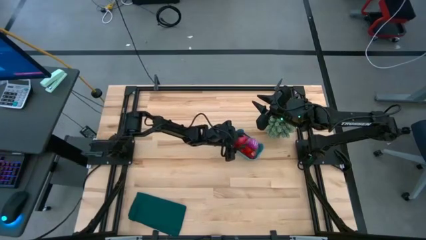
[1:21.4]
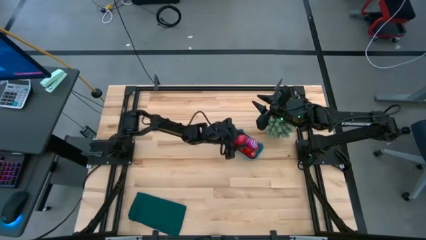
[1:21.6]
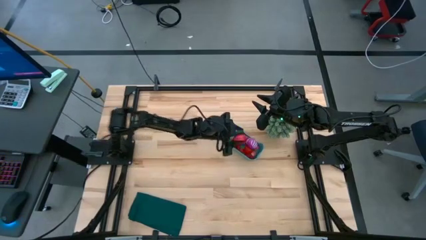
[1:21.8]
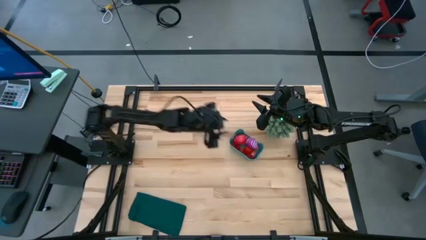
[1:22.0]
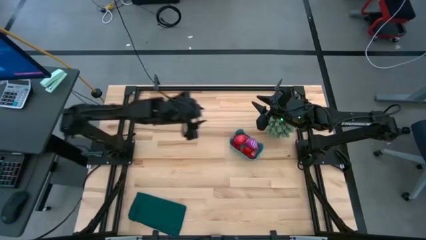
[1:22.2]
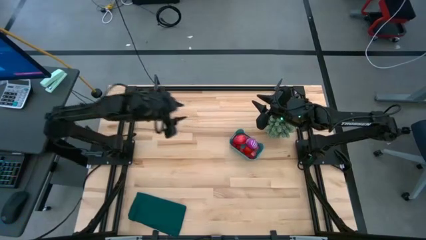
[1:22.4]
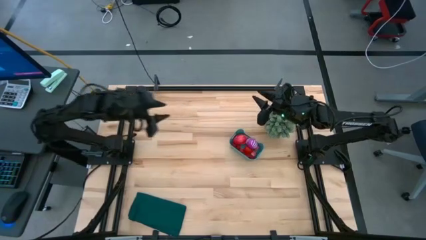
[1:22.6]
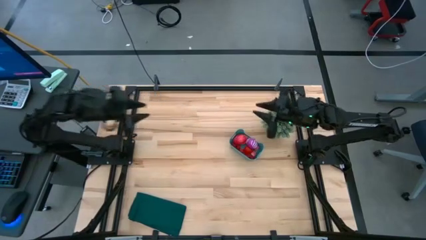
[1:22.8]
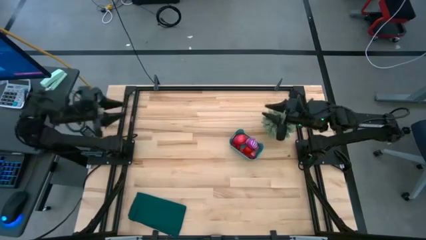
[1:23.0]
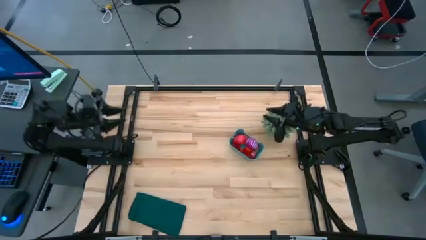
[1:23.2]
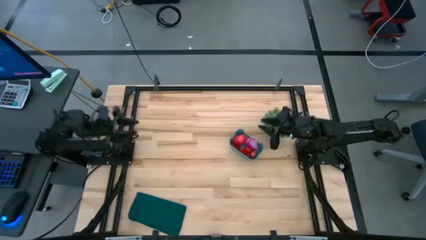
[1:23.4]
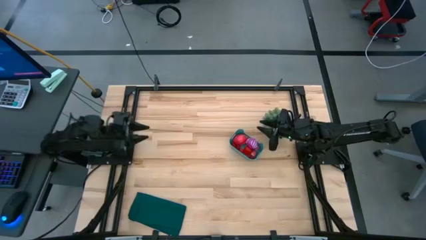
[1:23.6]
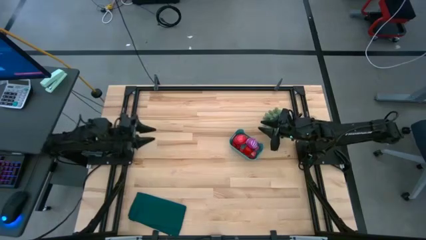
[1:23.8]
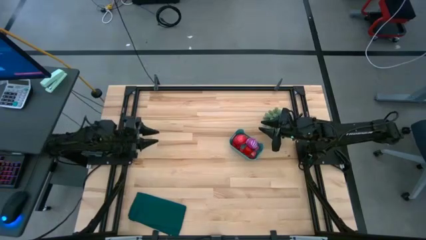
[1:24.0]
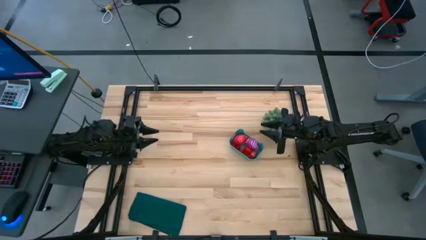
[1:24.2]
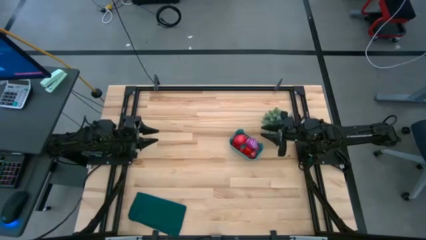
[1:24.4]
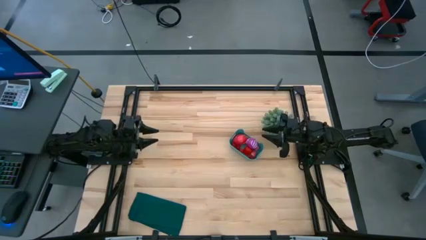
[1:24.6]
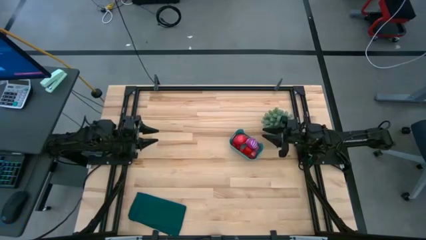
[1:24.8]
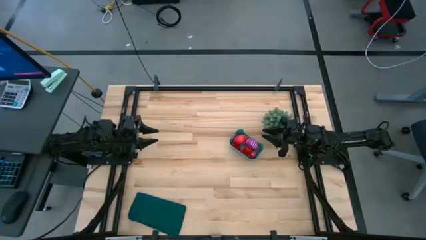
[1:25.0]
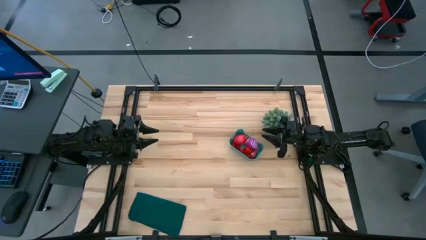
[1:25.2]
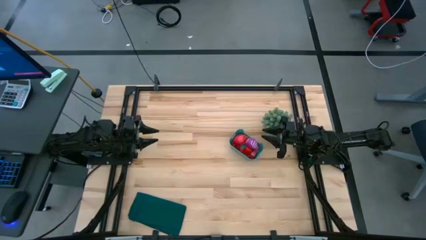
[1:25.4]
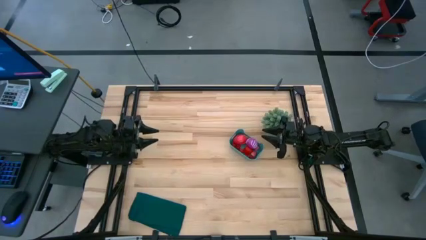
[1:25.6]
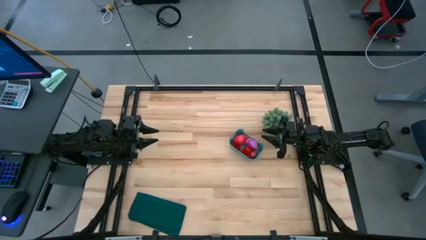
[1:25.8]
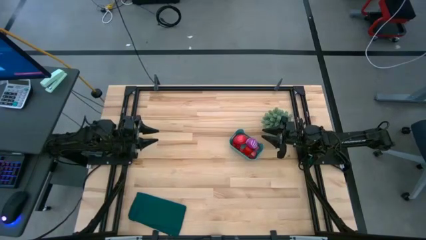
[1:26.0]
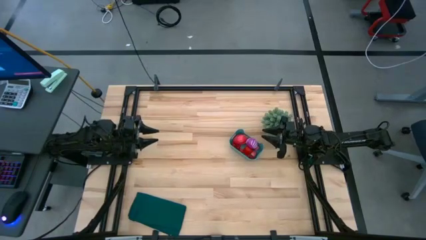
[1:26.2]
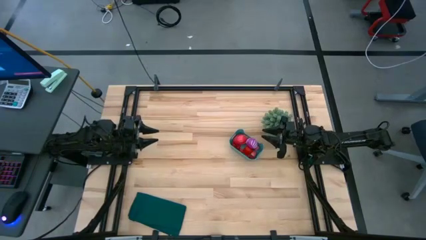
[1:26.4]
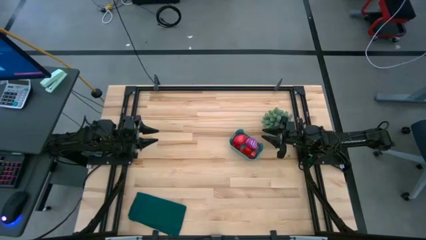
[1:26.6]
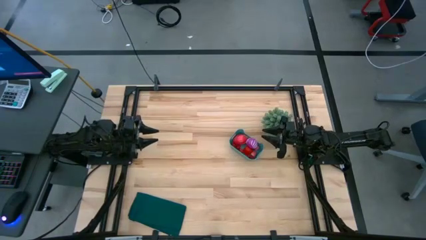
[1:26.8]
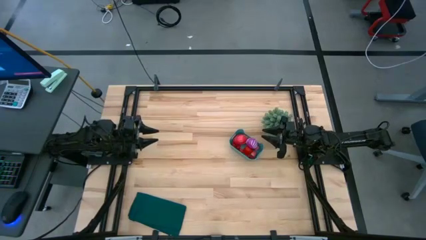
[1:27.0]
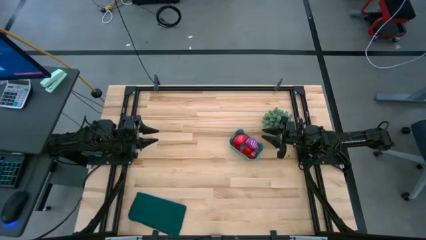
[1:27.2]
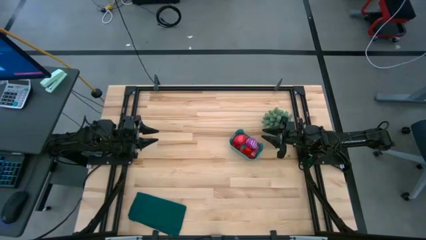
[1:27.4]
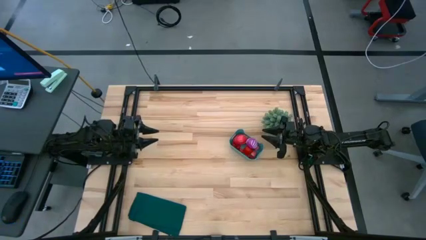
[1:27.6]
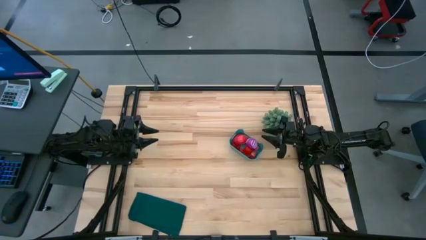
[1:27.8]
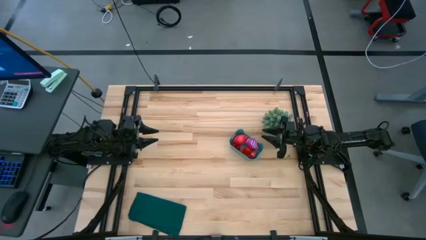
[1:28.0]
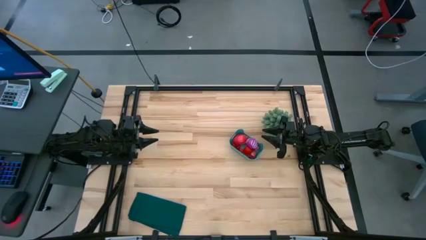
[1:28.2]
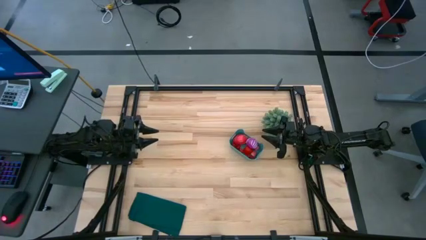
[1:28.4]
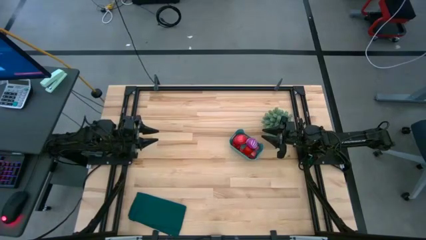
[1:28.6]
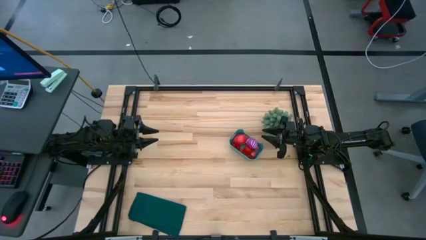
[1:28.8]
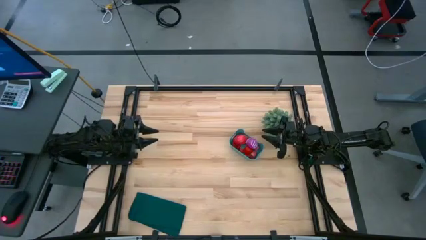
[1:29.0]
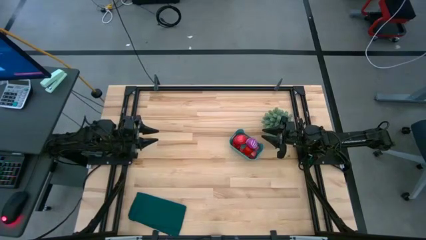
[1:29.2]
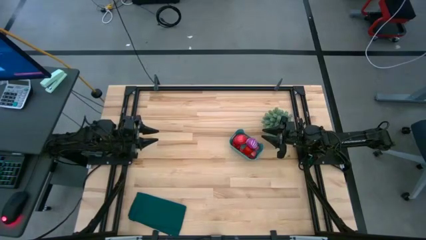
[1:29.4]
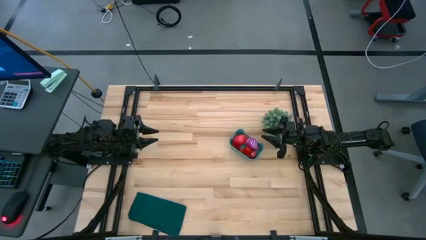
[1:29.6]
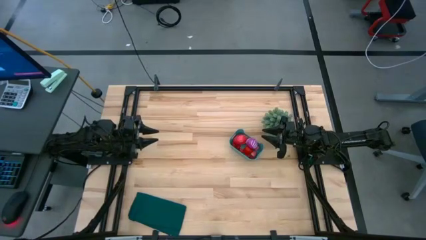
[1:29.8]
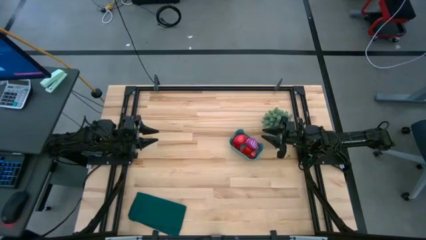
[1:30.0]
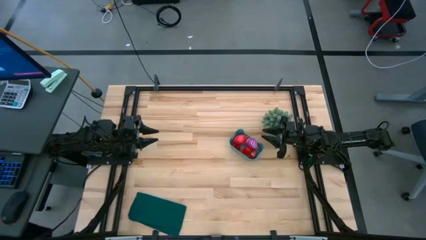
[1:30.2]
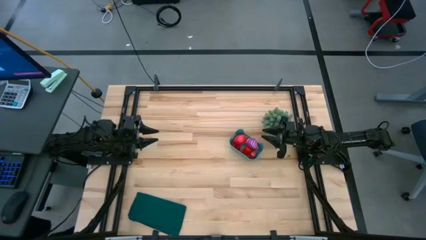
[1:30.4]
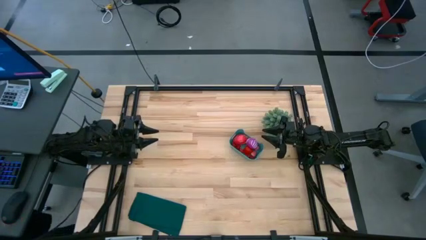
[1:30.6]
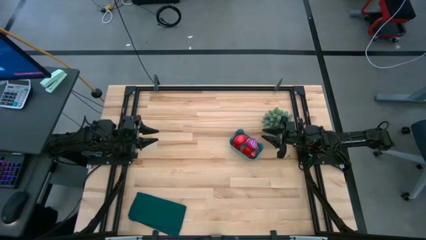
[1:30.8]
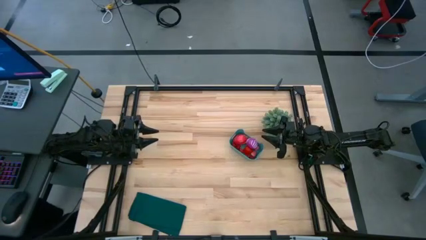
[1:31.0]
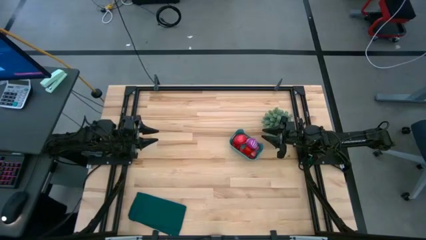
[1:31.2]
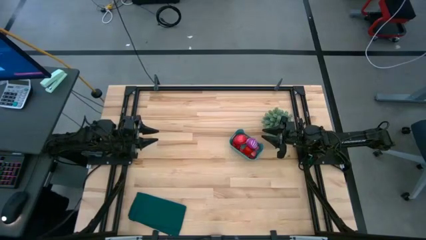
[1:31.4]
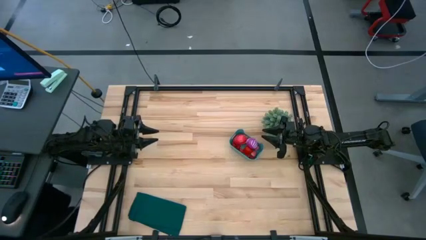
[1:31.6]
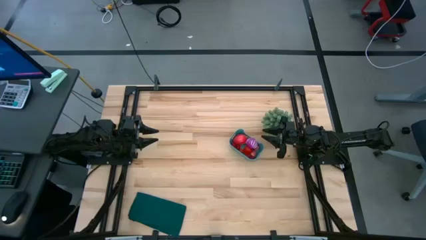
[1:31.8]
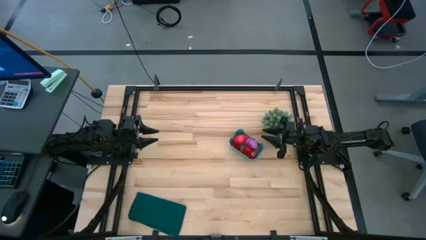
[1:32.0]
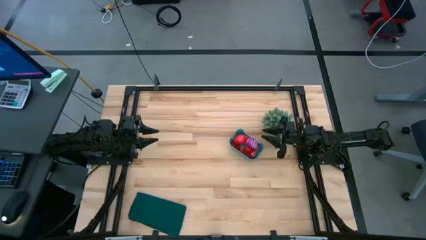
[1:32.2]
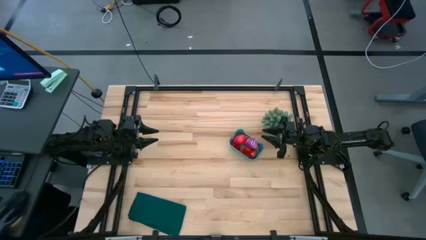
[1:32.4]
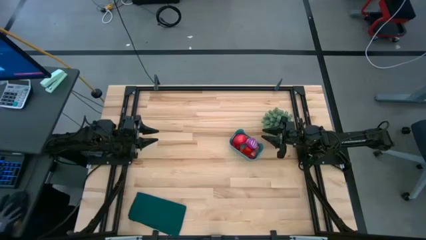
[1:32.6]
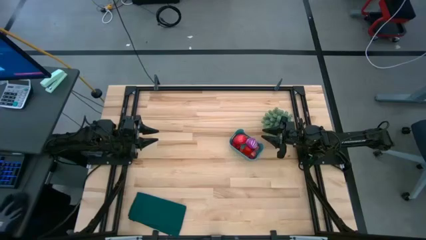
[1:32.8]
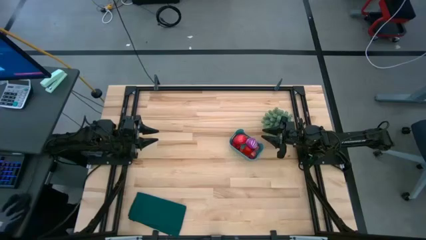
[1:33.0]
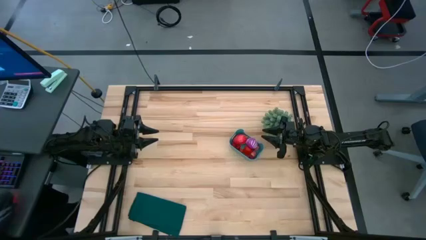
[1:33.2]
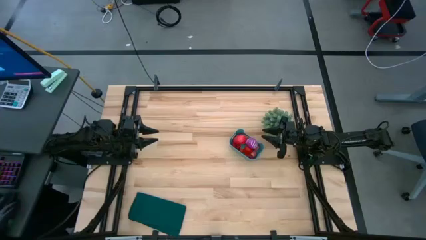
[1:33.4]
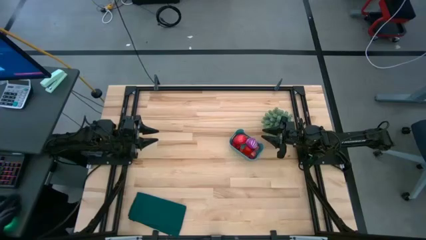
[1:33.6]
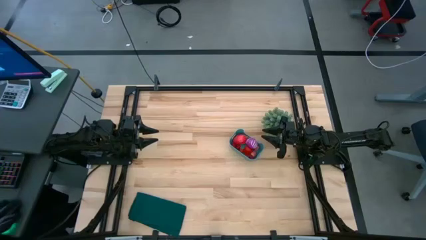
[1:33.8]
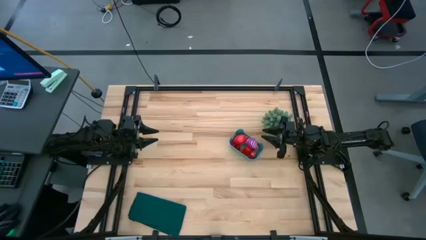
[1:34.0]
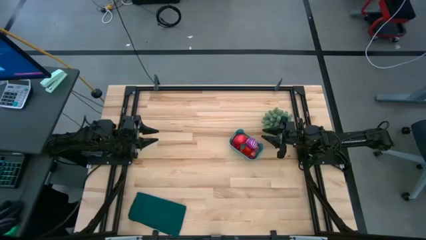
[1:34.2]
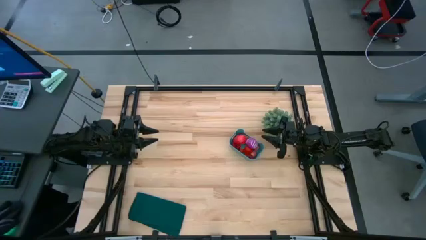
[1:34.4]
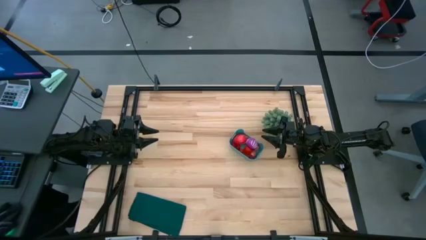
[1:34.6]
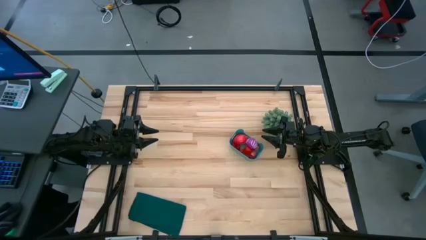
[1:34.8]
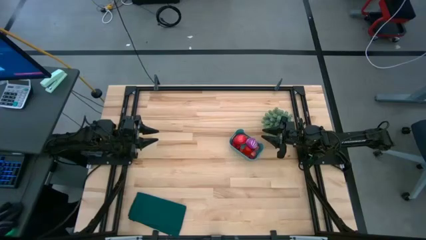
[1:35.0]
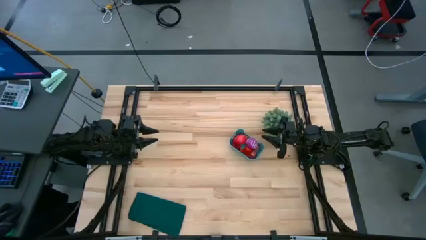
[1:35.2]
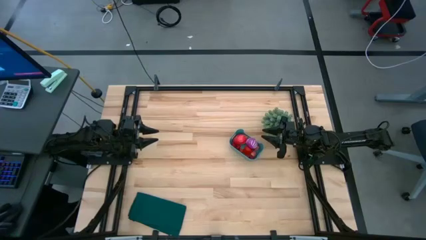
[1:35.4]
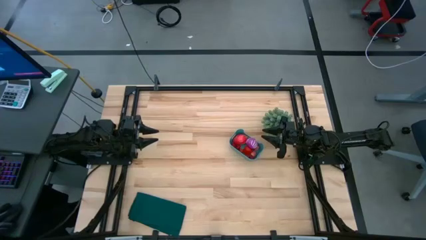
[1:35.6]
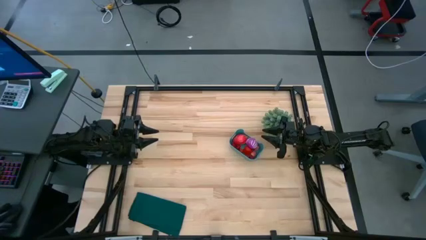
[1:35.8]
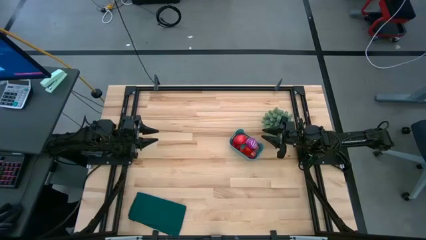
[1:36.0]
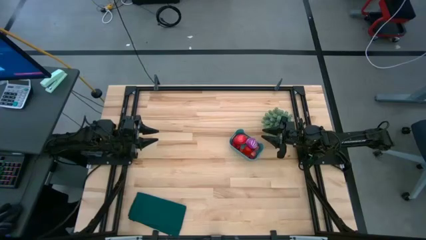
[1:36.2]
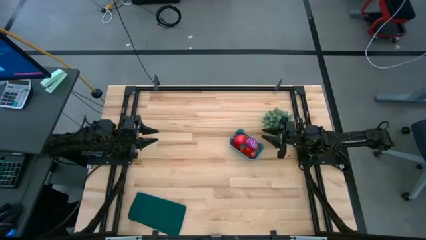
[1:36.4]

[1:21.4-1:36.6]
Task: Pick and placing Produce into tupperware
Return to home position

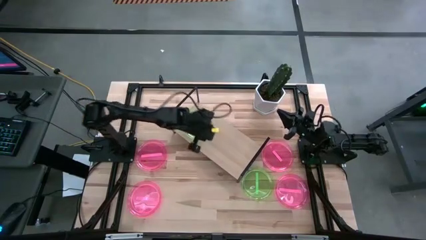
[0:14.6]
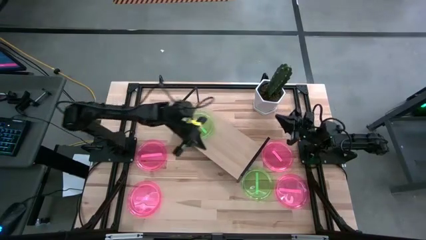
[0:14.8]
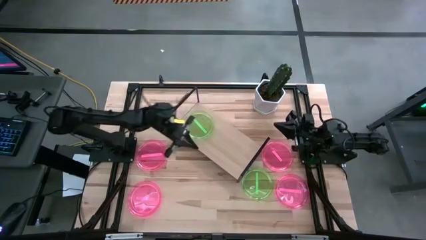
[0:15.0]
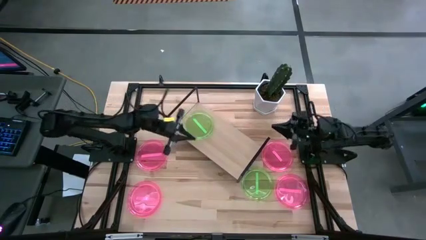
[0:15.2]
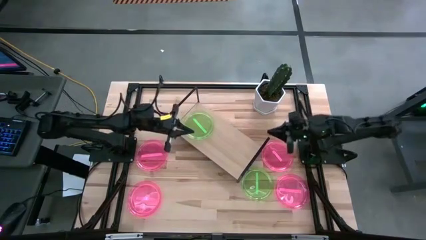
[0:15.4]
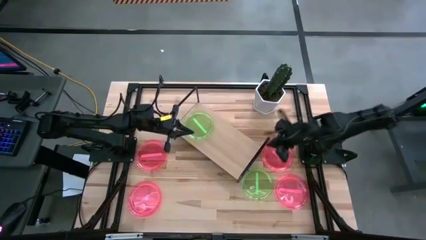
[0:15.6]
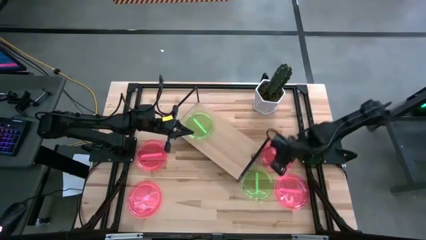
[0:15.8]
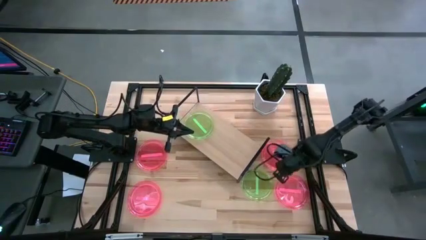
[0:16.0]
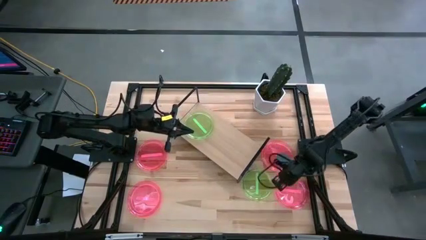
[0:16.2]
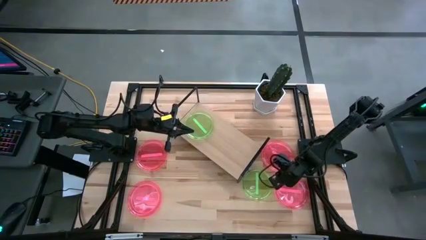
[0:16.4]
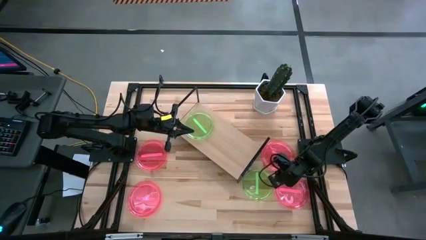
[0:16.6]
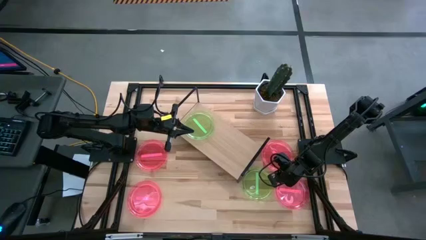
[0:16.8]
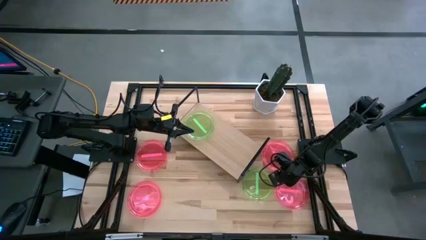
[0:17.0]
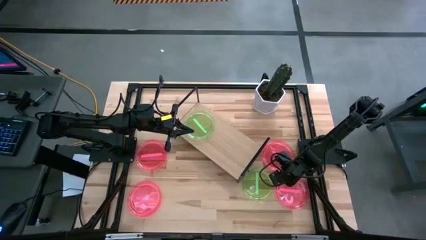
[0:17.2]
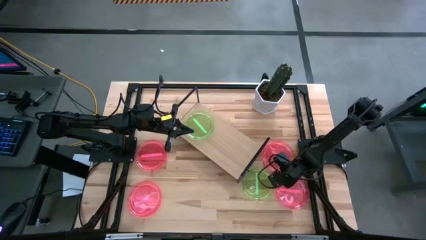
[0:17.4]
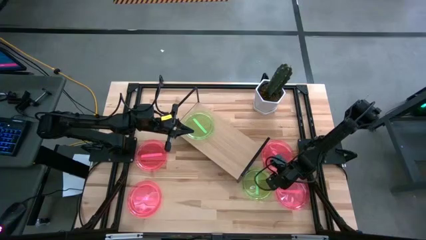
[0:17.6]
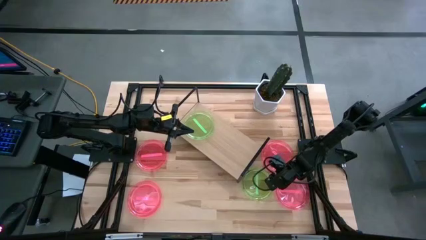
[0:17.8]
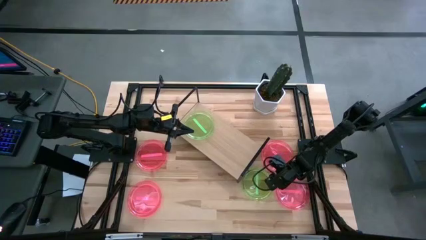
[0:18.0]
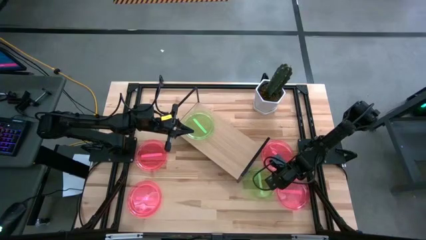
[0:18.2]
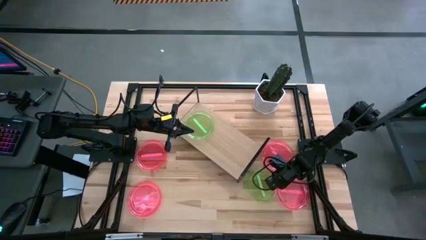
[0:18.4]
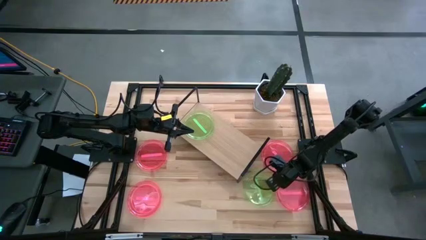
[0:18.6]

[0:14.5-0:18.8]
Task: Place and stack plates onto a shelf
Stack the green plate on top of the other green plate on the shelf
